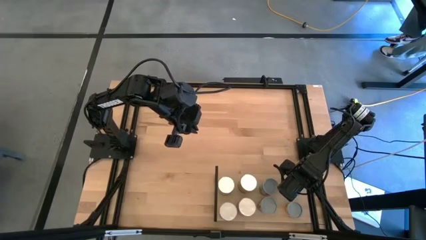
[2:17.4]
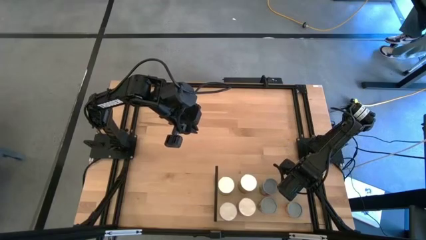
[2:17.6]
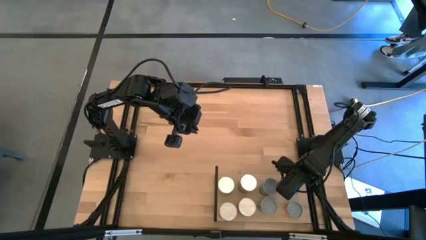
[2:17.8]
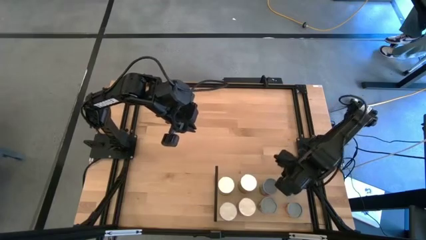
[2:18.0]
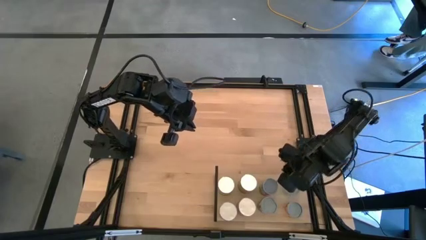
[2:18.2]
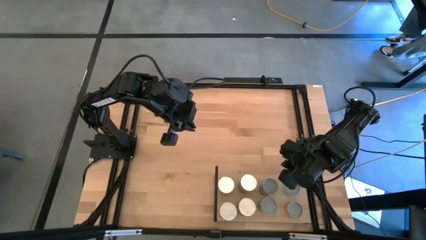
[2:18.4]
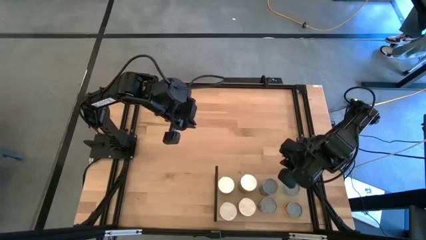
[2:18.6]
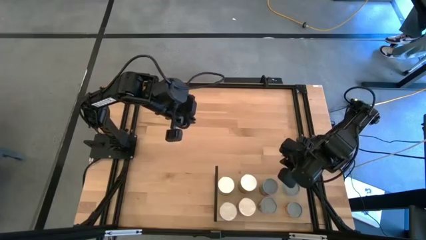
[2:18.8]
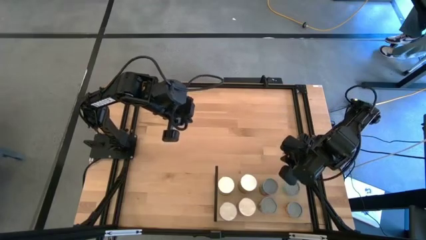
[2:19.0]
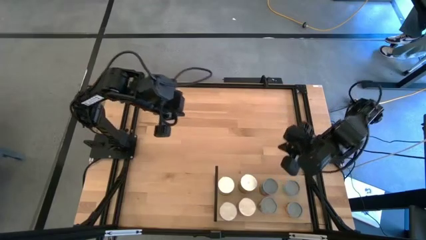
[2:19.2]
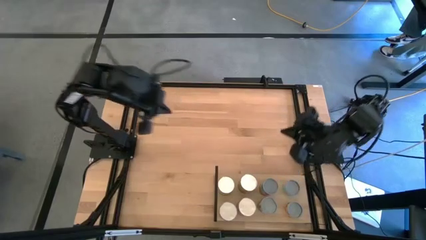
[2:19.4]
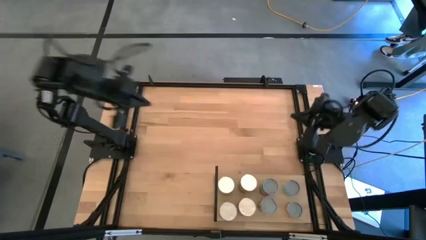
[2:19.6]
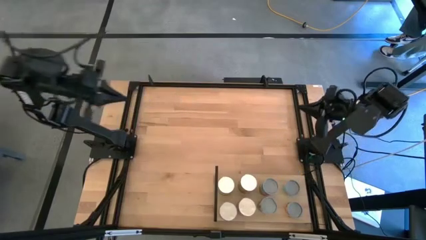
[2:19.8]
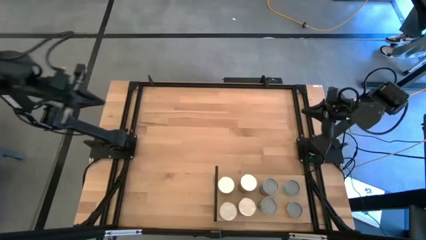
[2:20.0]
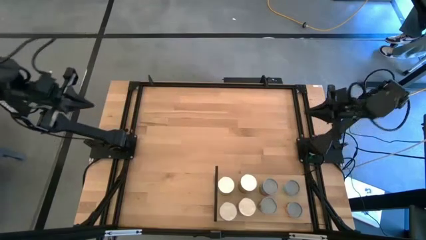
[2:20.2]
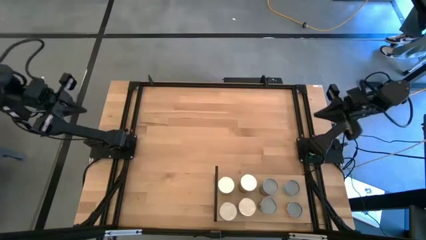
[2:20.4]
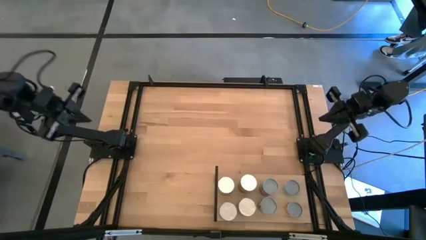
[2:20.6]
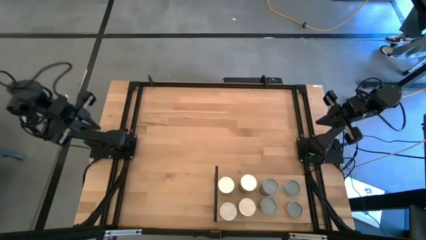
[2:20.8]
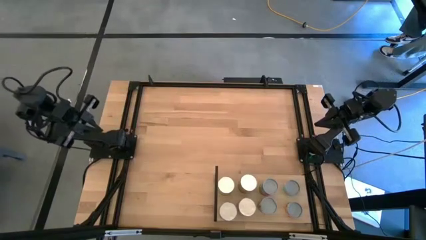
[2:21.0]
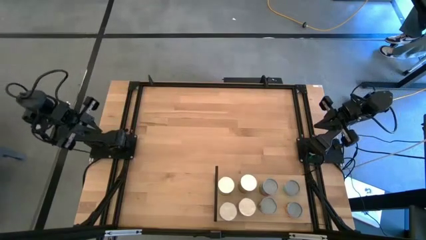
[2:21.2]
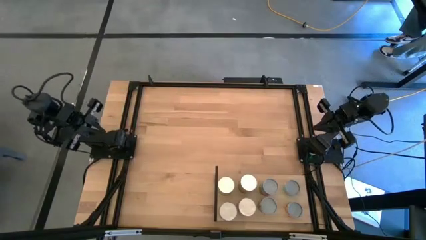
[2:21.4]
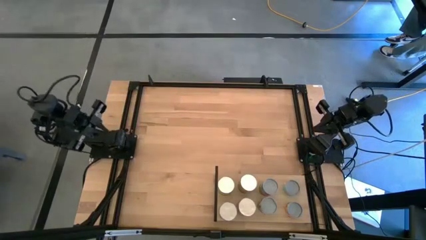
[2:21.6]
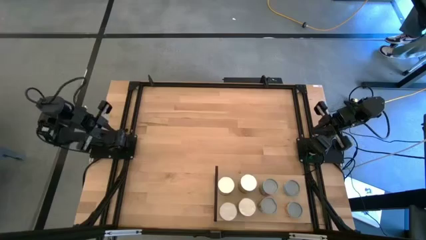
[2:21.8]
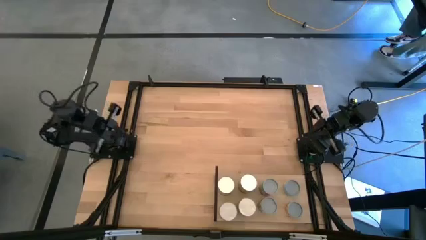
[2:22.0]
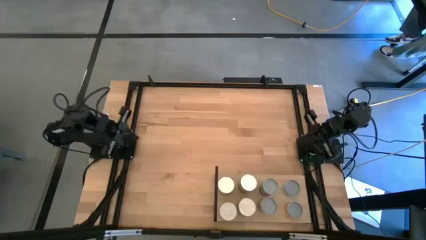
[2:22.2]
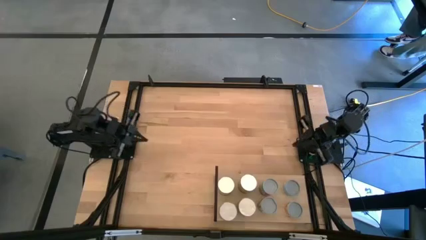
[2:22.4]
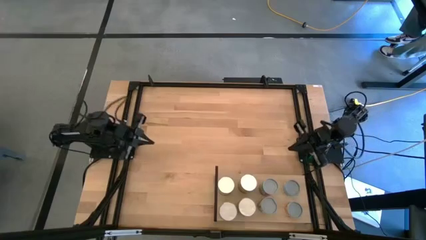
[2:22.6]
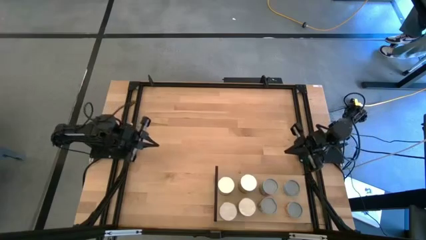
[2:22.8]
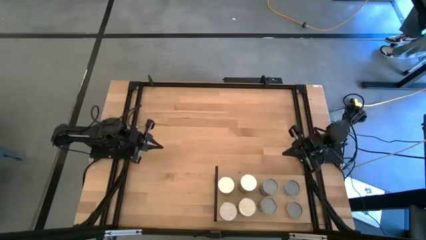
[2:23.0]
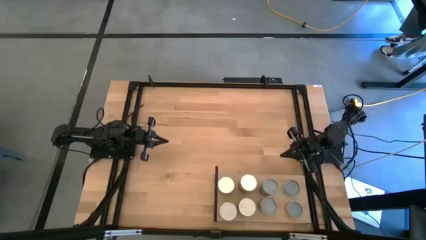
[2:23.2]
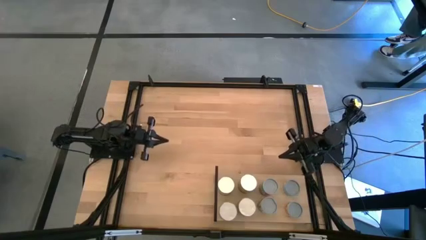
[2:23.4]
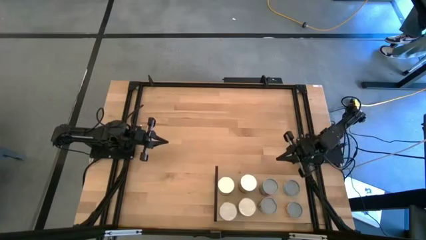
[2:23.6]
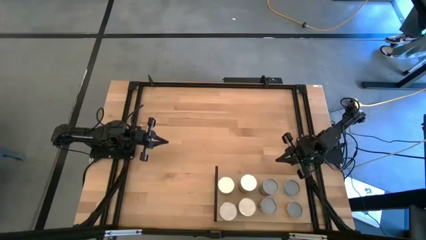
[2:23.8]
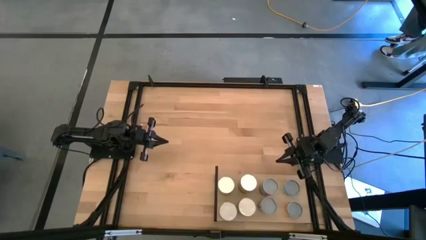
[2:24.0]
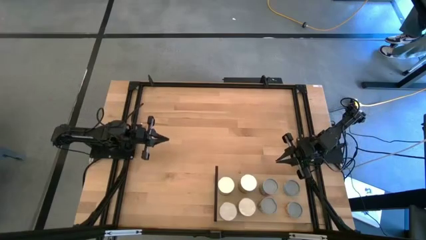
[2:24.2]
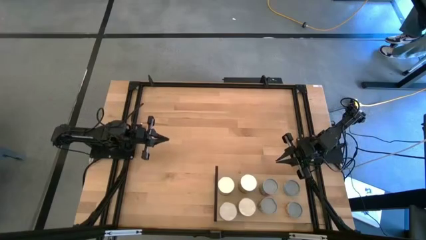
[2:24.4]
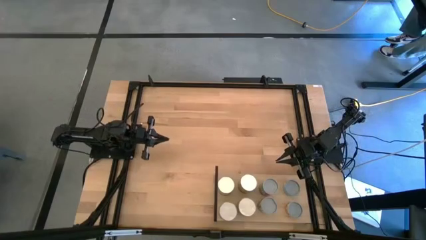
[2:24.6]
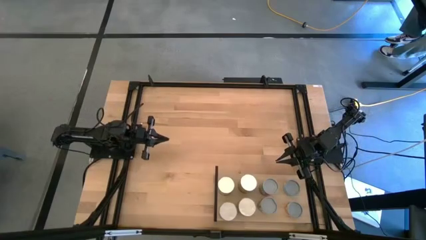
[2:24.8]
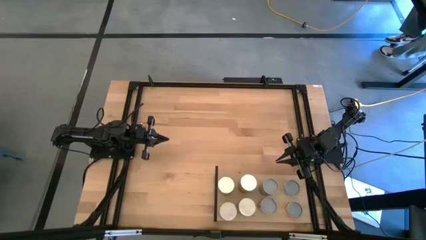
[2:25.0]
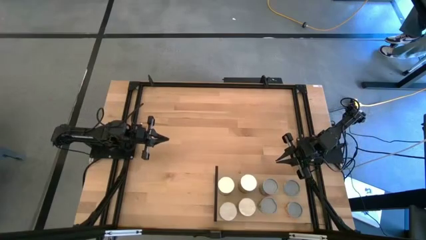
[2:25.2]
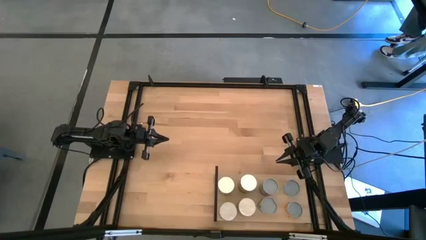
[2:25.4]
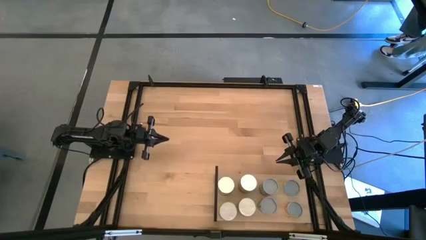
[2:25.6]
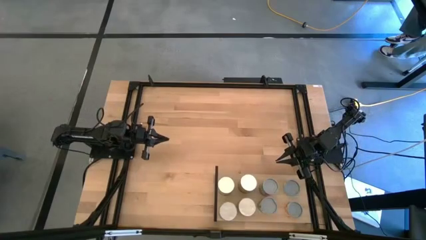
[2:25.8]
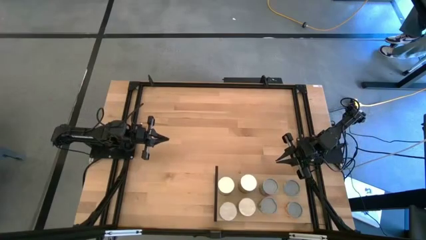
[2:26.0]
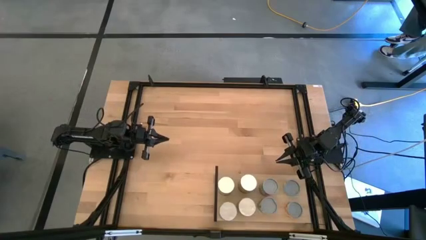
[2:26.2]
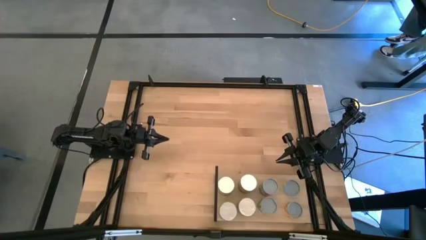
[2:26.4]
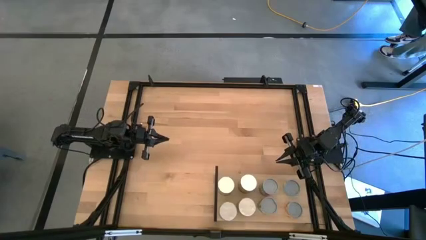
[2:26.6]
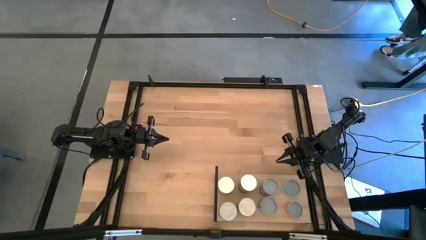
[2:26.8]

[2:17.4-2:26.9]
Task: Pick and place cans onto a shelf
Return to Home Position
